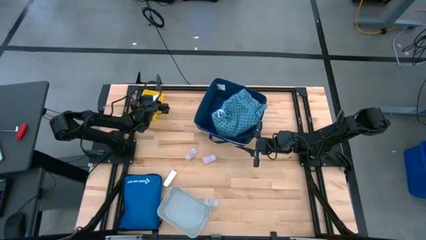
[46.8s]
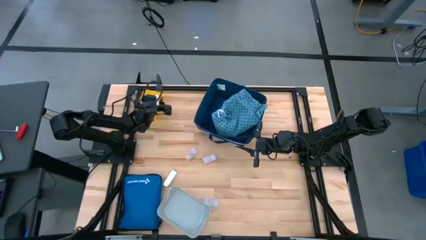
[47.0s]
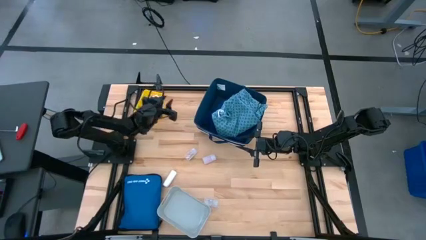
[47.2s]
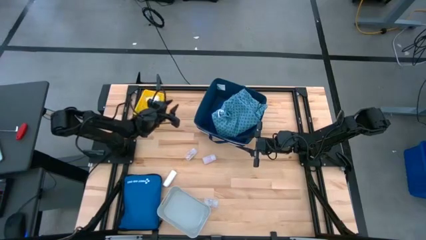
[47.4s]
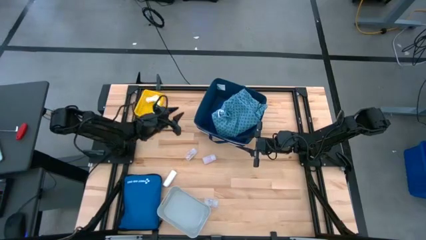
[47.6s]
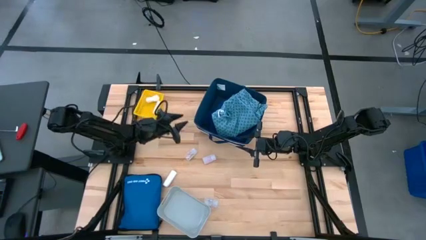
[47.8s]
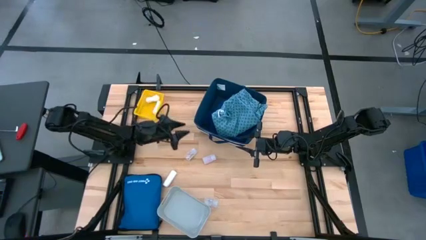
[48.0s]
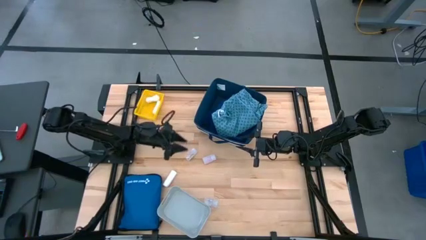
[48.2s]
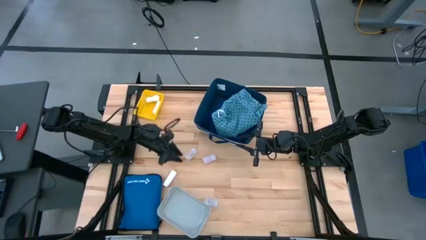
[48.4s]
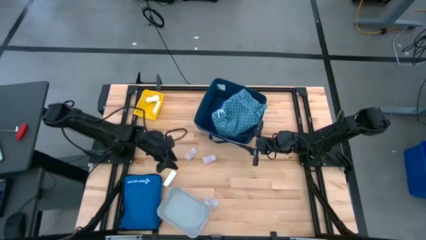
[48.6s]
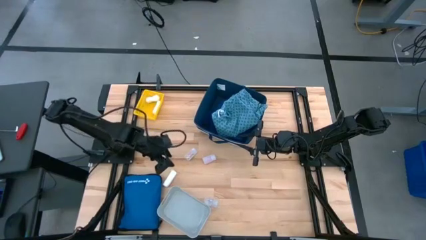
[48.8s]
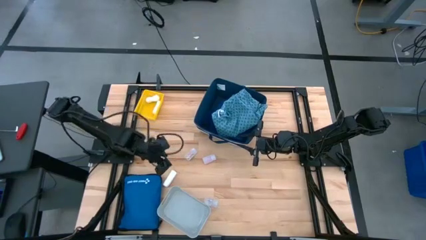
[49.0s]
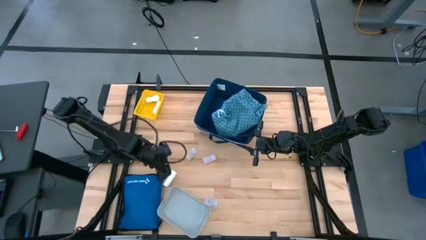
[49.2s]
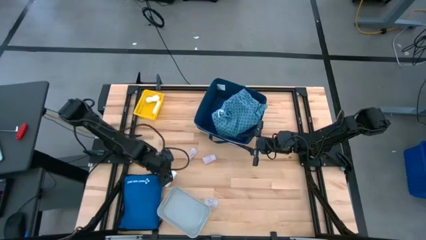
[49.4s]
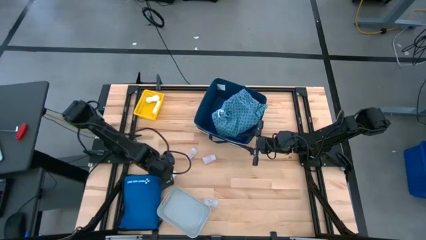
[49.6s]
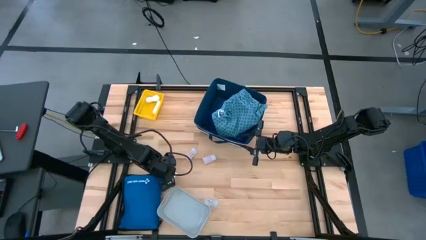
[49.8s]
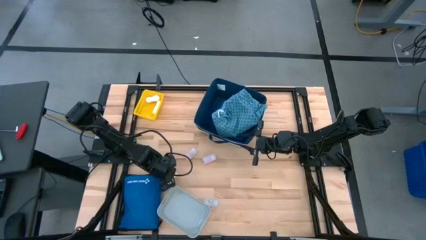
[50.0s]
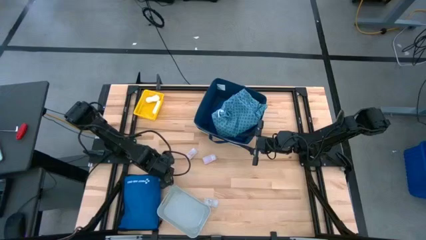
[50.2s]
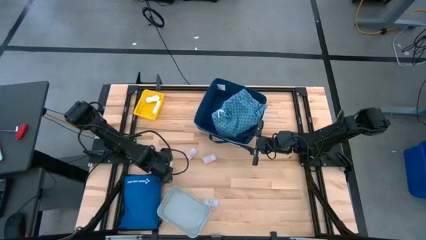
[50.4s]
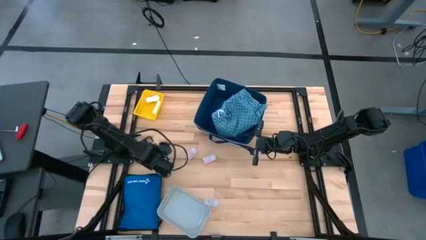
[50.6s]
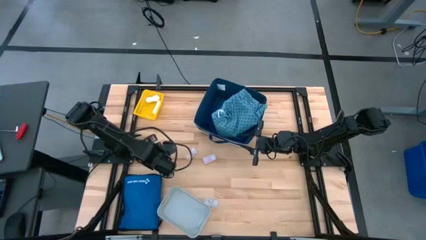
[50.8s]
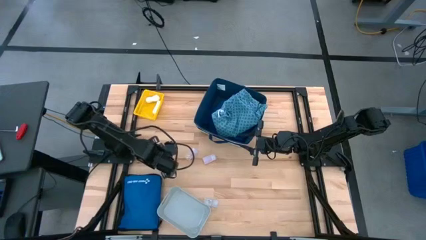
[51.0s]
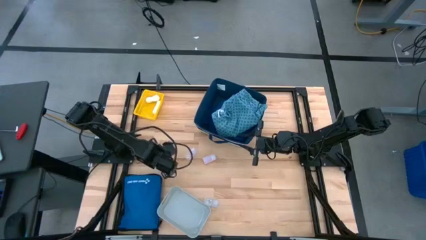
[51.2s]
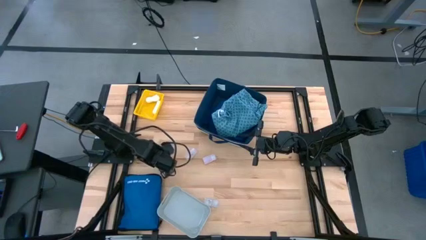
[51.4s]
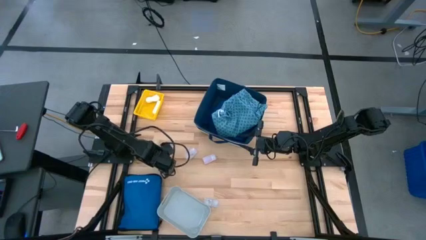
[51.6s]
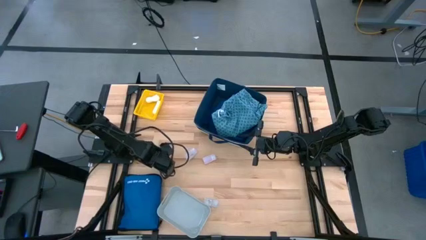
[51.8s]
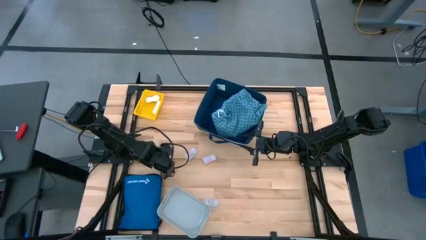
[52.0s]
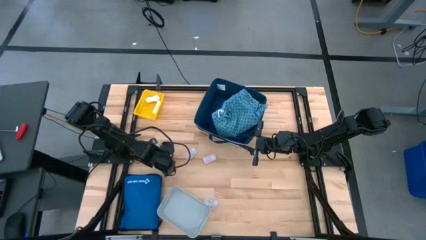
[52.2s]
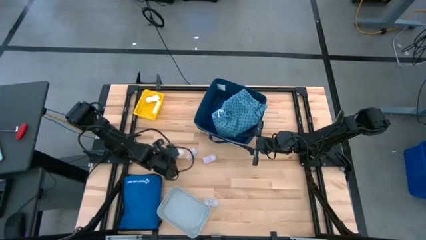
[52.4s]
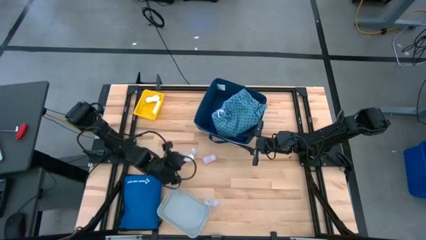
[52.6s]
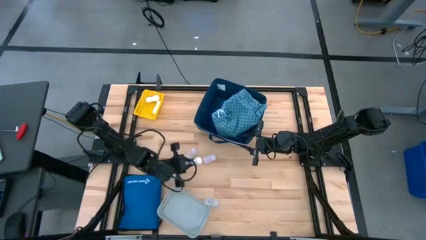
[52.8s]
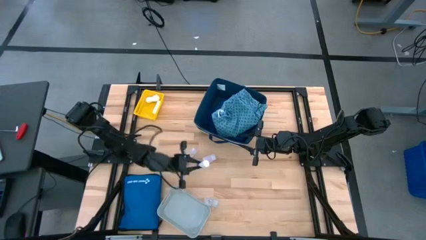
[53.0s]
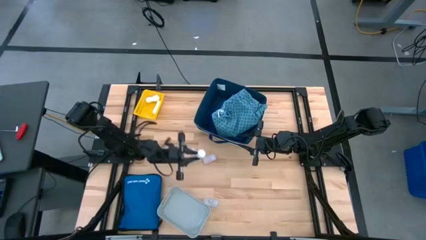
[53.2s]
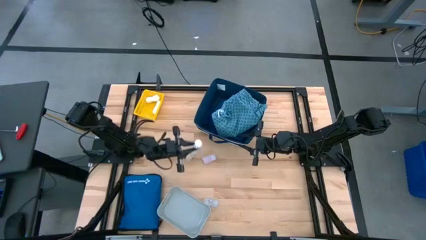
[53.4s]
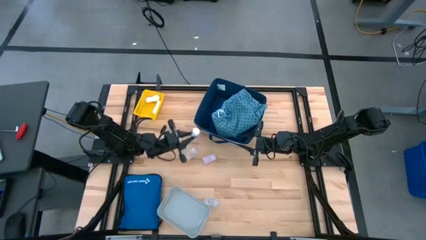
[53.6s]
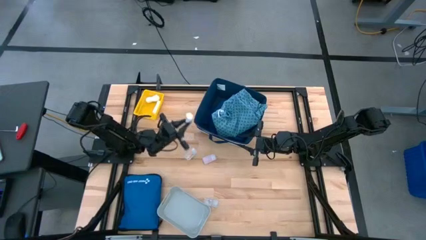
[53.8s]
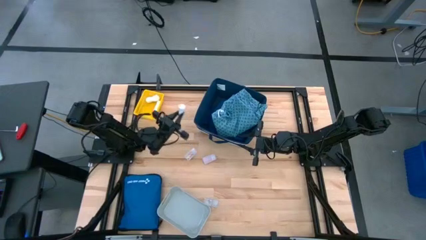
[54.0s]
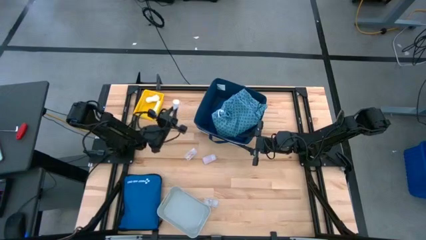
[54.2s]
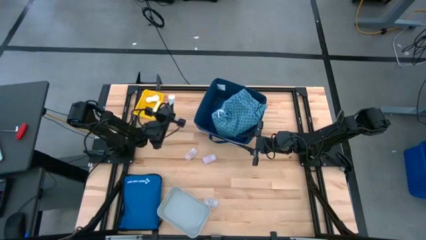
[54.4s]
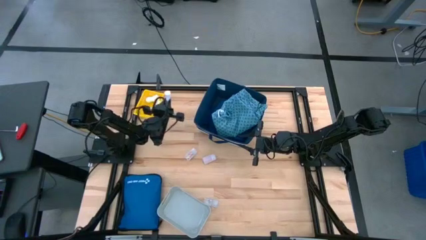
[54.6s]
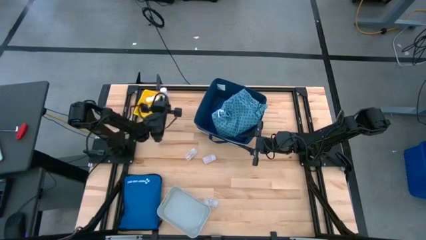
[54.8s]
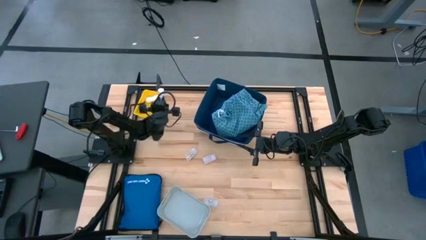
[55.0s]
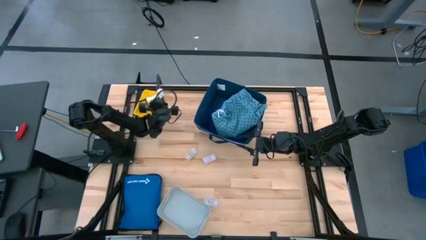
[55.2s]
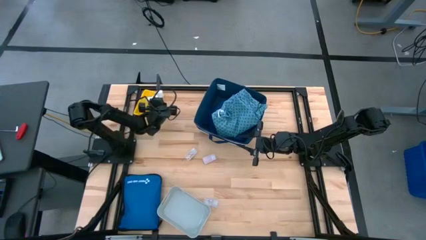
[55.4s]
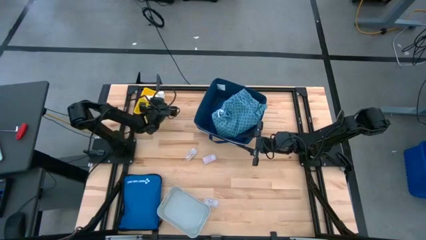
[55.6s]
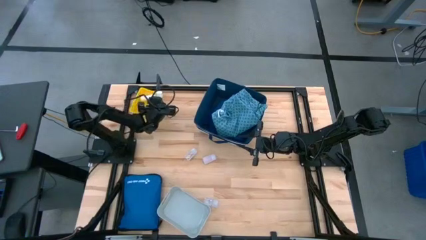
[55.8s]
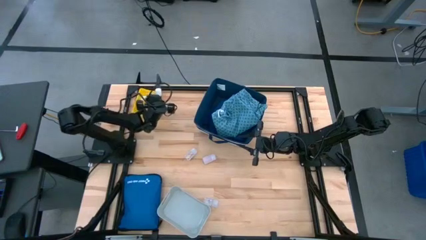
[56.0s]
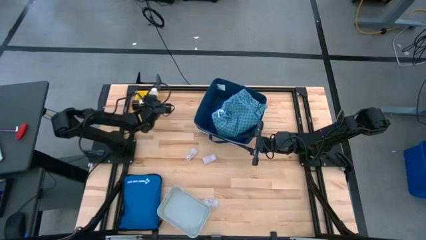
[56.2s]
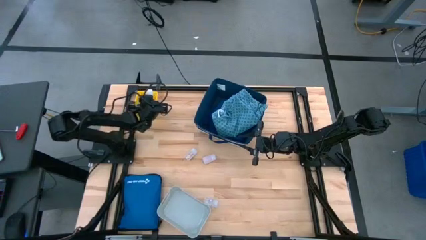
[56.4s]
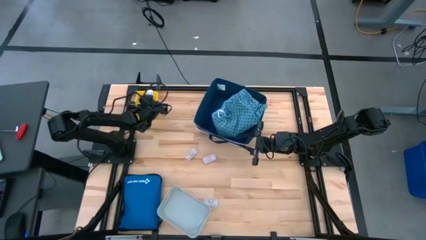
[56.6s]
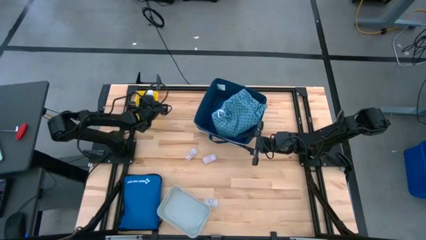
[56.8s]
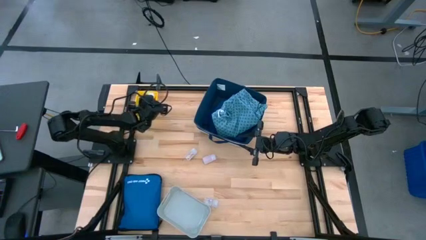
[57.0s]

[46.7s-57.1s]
Task: Pick & place medical supplies in basket/bin
Put the white rolled gauze into the yellow bin

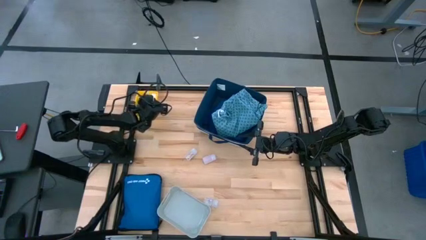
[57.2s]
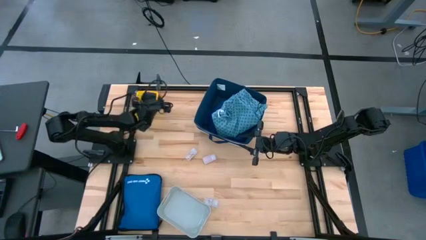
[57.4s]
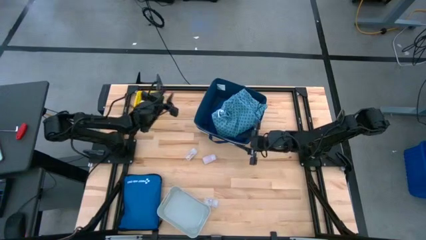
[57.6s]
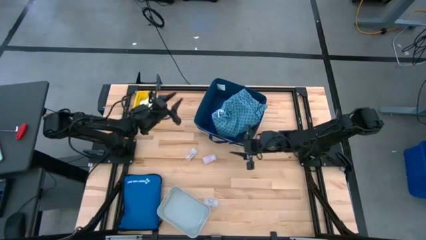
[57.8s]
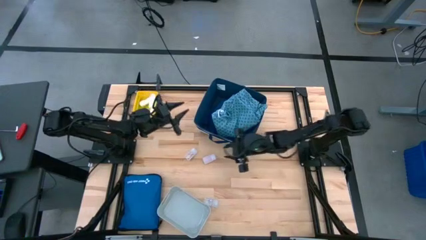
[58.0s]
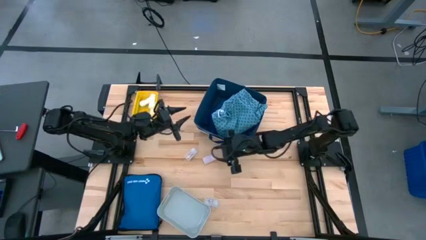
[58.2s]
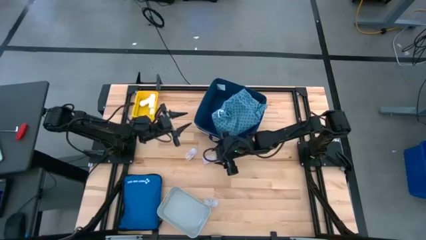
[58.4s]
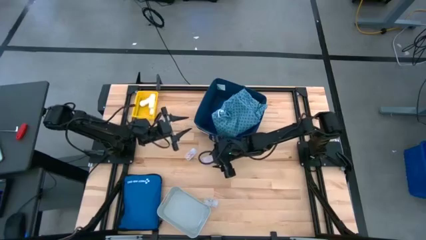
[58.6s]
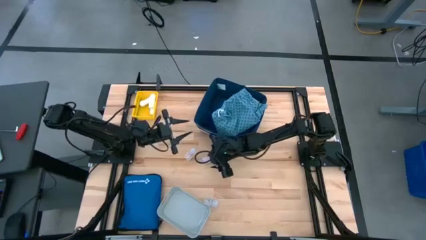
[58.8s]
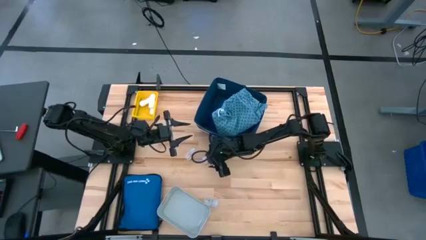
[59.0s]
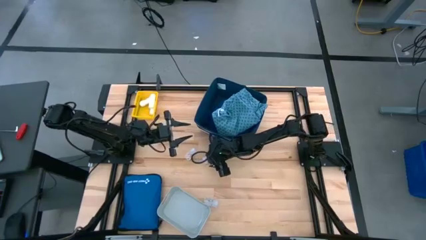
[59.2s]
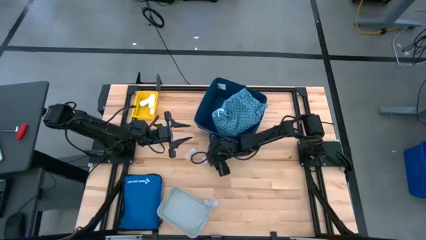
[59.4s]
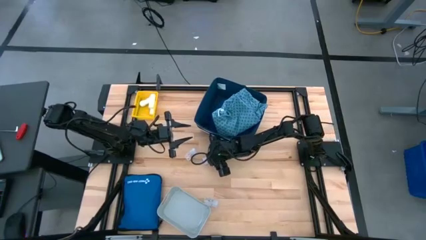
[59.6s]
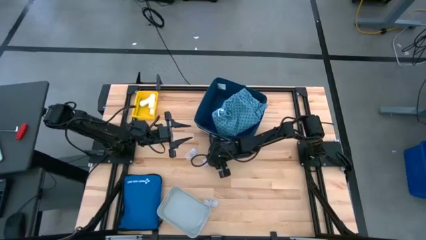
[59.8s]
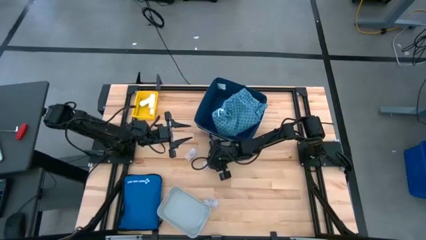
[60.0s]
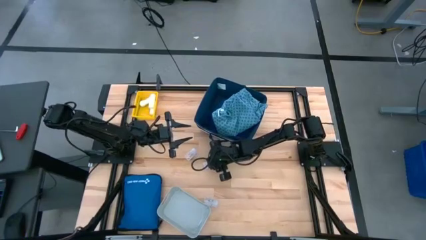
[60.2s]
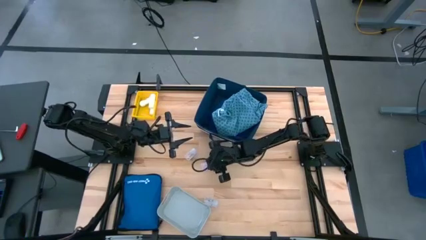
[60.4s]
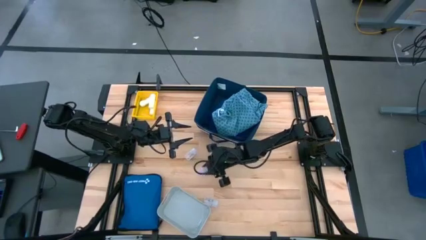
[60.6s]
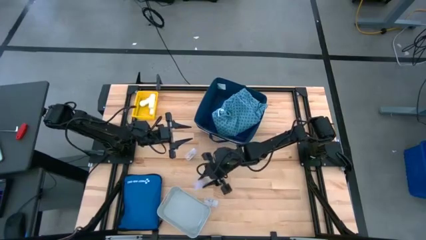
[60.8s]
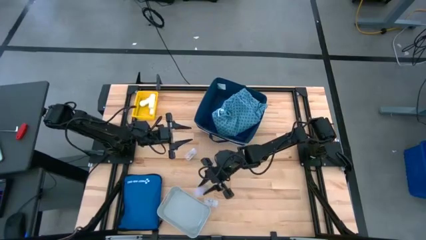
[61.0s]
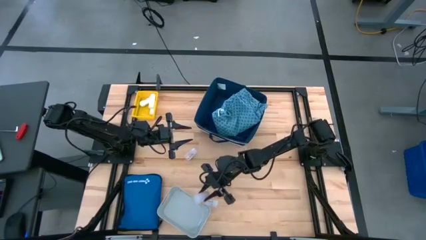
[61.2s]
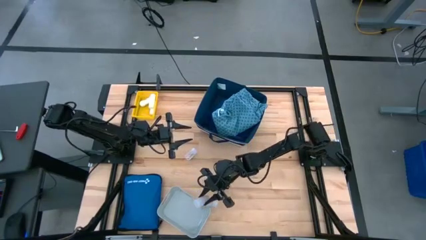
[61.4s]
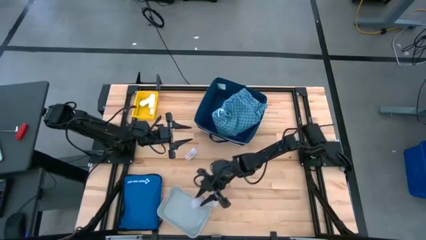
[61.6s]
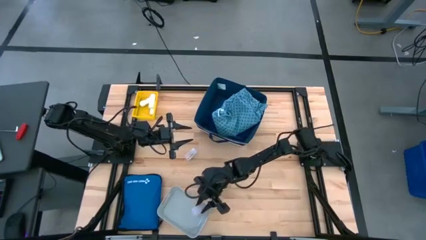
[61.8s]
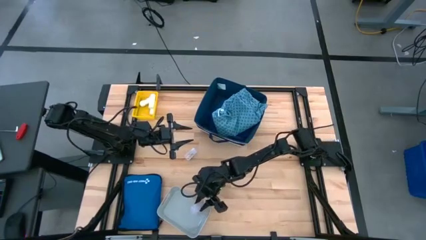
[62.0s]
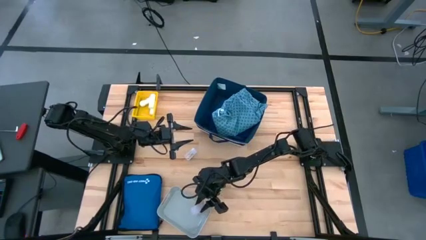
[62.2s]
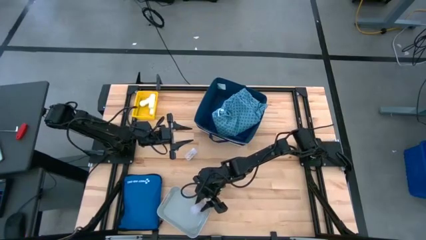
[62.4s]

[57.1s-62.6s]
Put the white pill bottle into the gray bin

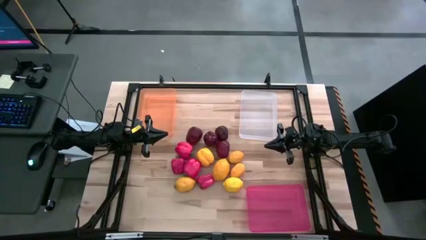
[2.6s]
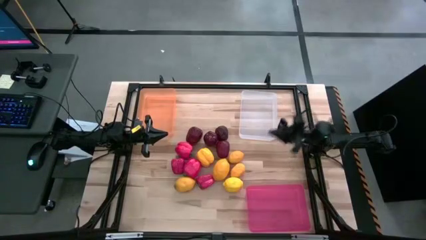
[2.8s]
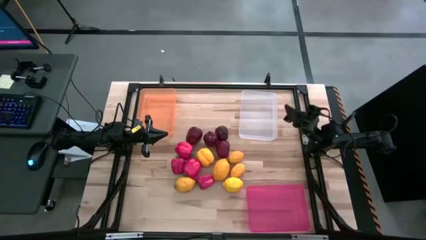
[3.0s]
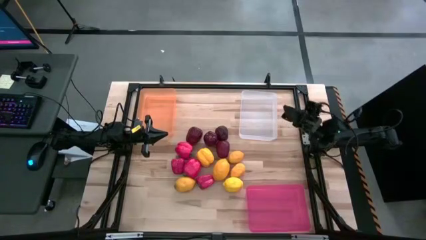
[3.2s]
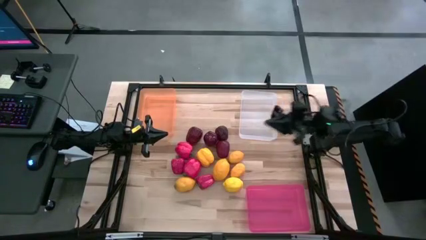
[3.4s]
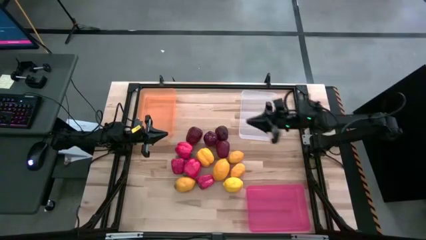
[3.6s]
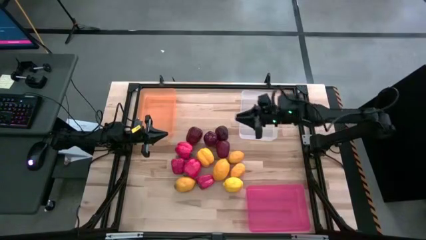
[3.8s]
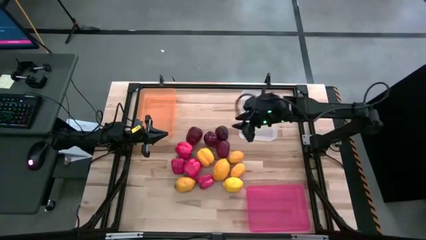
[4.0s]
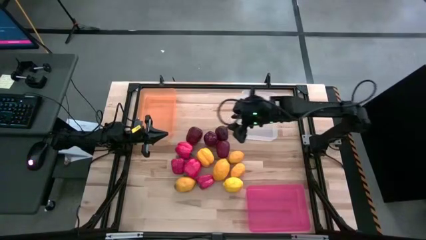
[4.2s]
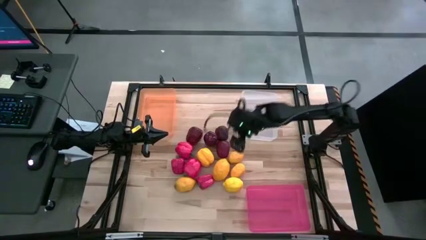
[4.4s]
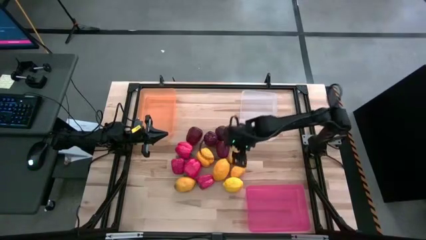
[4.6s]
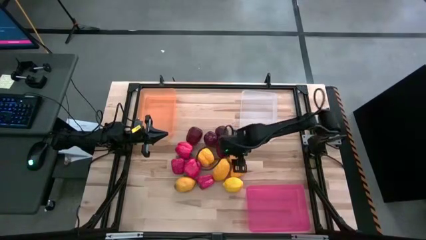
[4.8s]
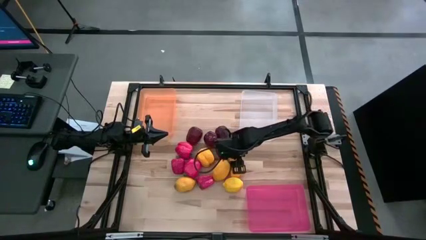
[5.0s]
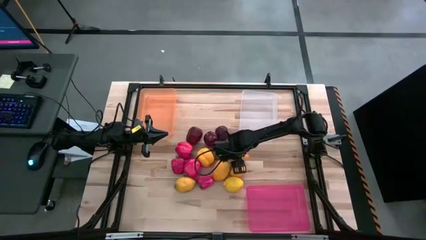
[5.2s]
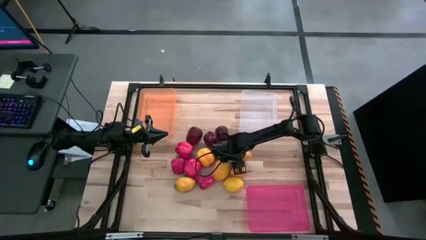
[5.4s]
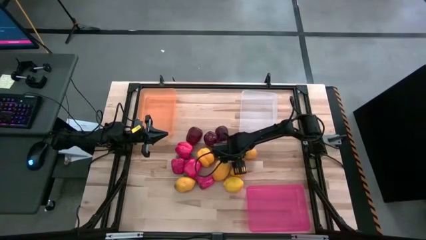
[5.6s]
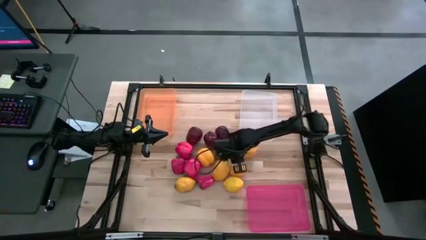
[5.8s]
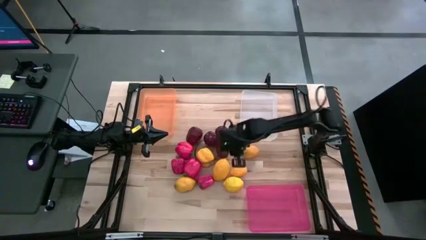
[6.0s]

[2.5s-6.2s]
Task: Sort produce into baskets
Put the lemon into the white bin
